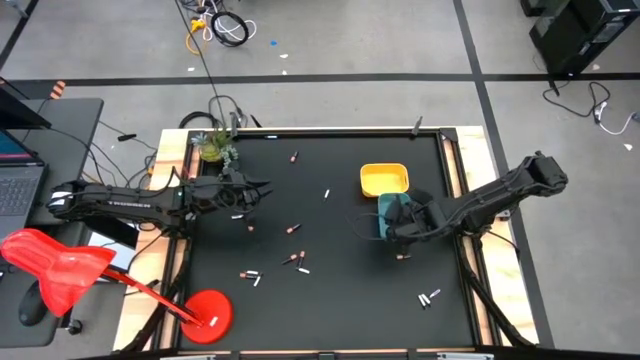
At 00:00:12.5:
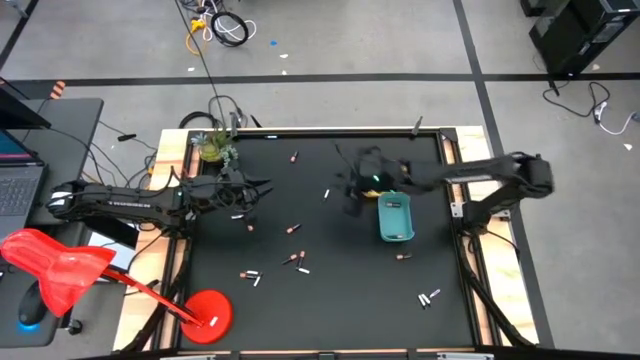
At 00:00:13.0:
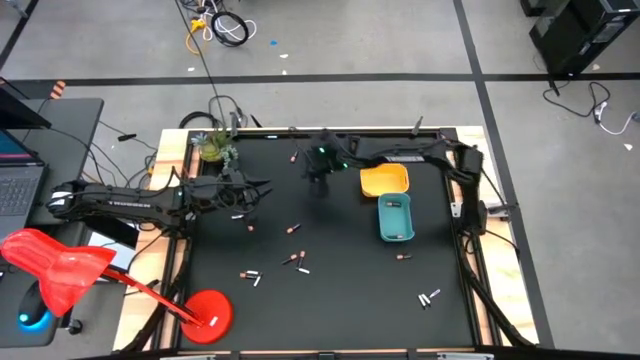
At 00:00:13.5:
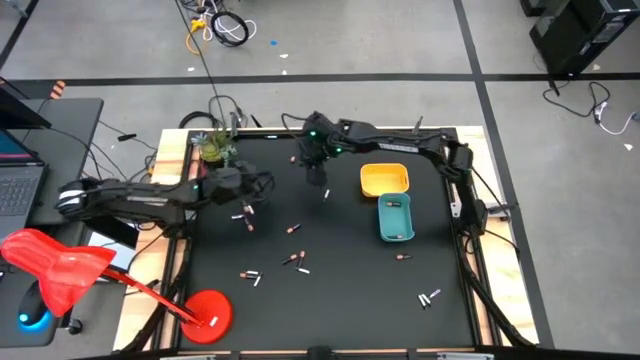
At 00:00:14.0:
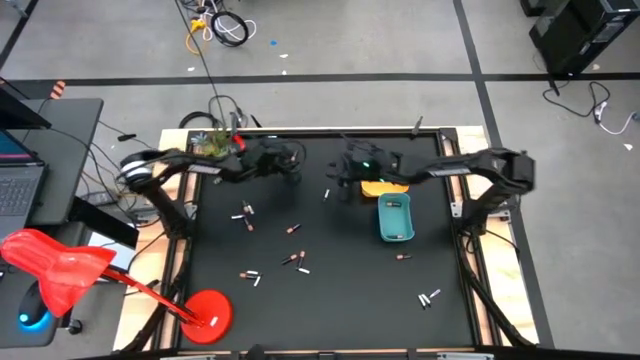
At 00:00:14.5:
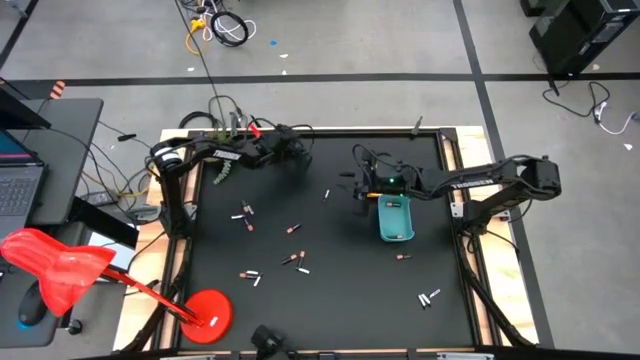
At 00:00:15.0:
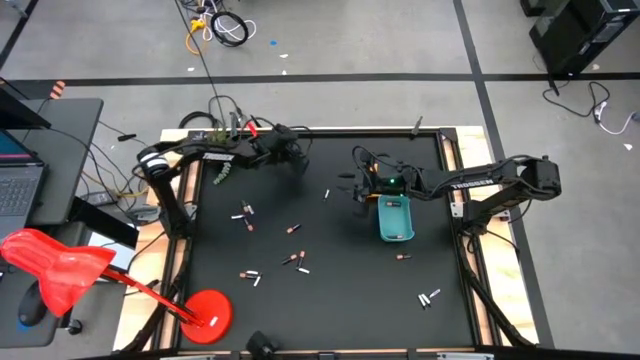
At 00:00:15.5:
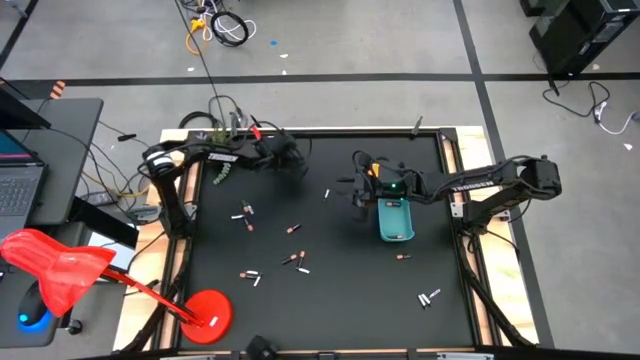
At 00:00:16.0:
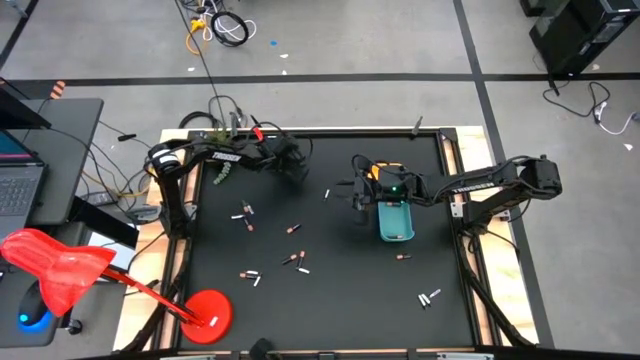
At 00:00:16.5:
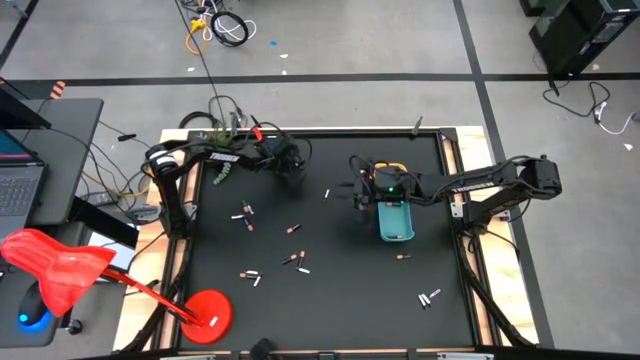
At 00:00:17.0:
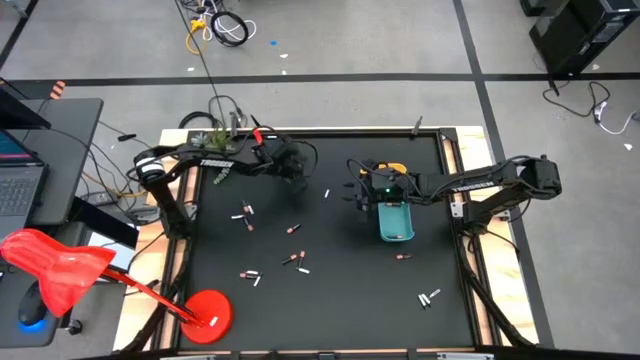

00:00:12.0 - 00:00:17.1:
Task: Sort batteries
Put the gold black battery into the blue bin

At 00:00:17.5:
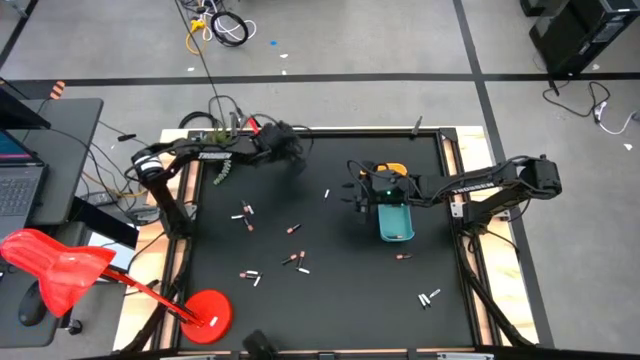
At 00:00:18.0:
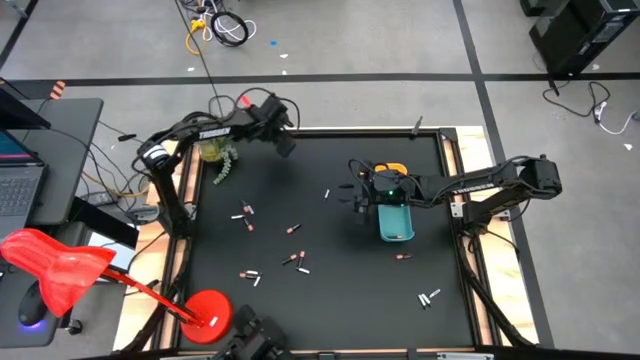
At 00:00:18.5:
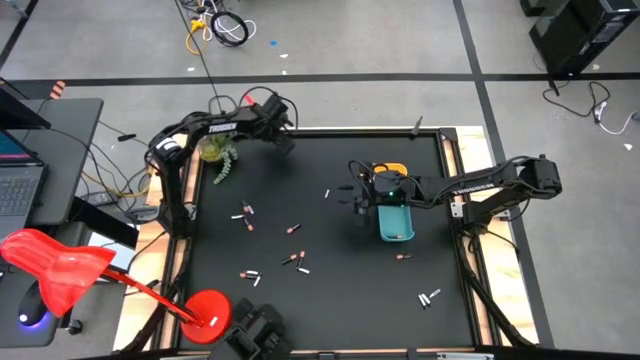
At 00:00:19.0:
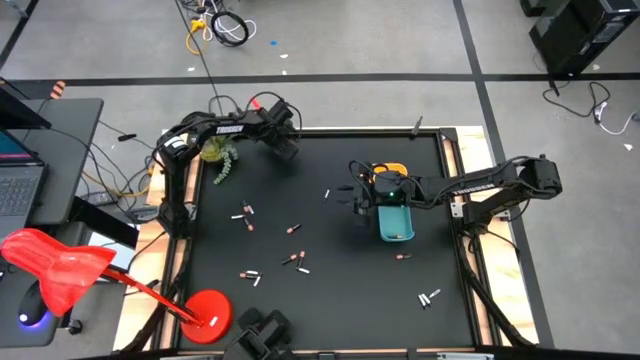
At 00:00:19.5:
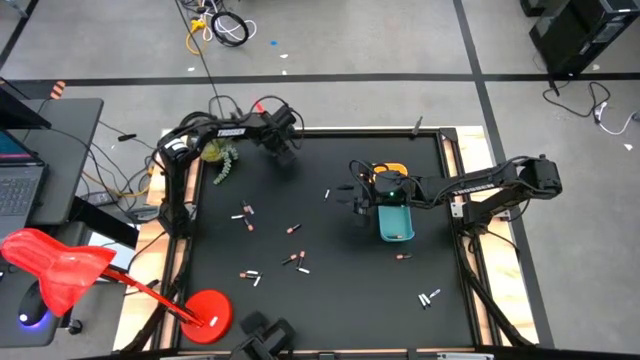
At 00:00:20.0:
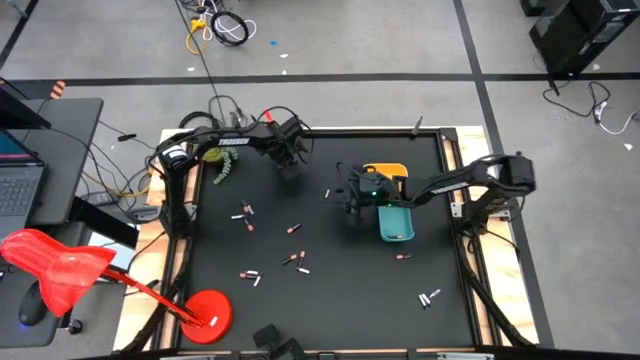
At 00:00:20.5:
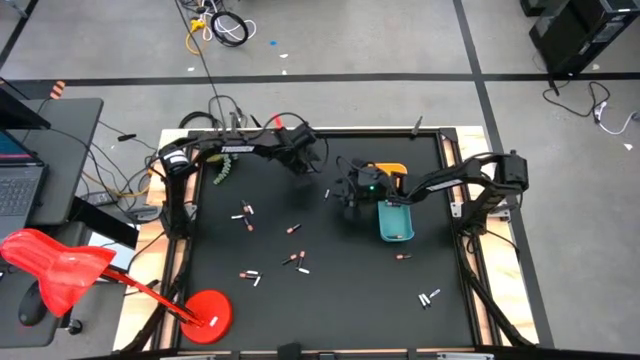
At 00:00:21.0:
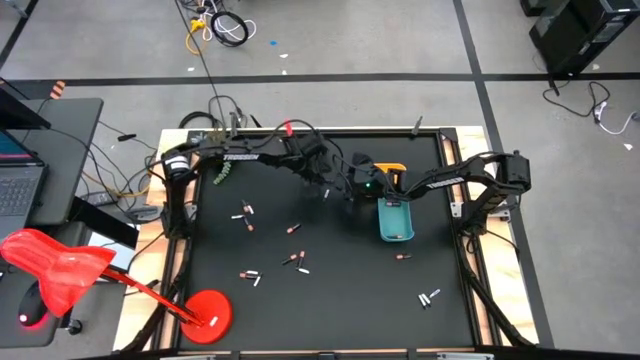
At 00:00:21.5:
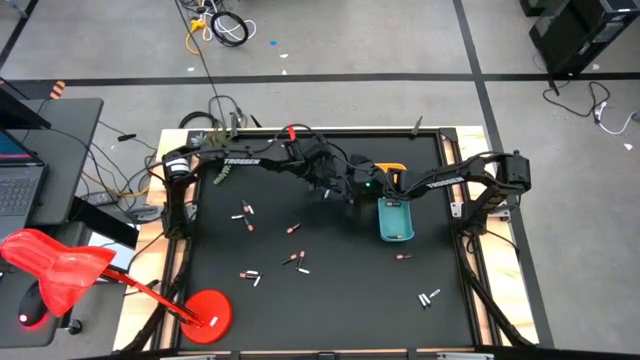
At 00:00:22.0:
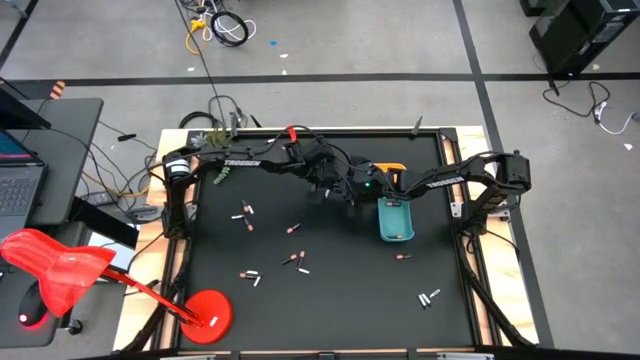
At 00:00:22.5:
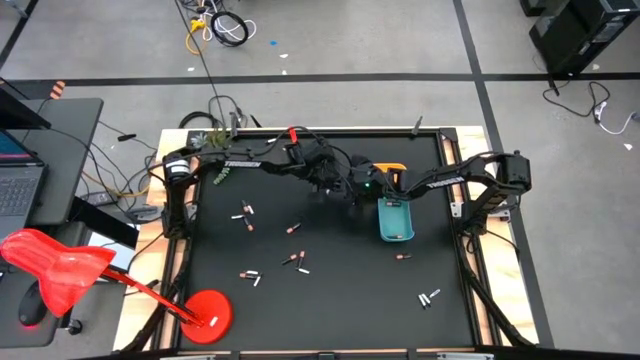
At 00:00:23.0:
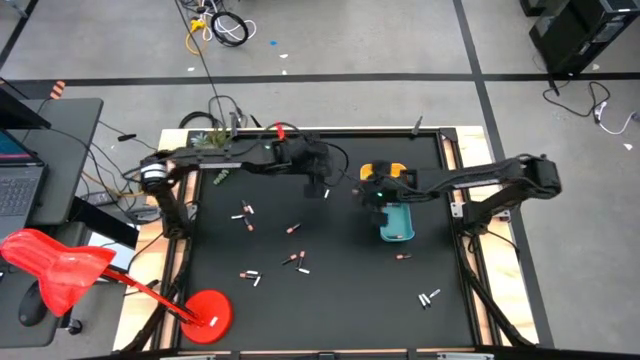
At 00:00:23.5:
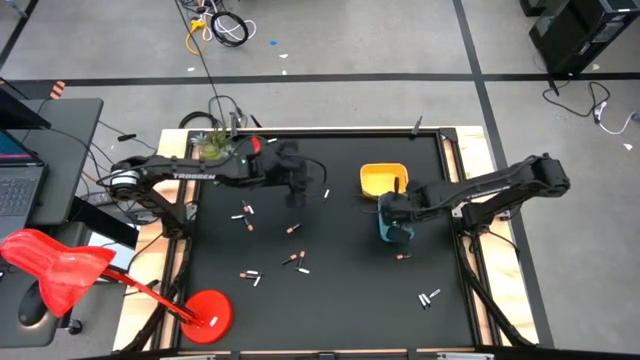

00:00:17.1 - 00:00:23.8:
Put the gold black battery into the blue bin

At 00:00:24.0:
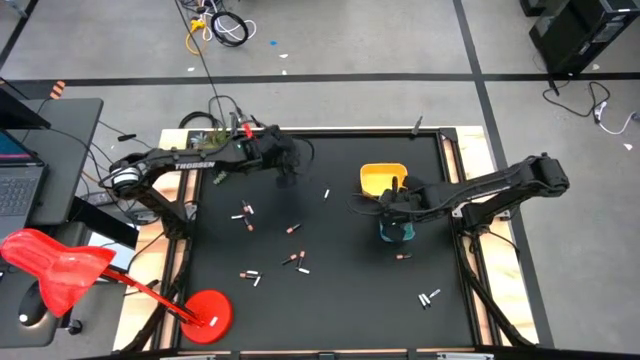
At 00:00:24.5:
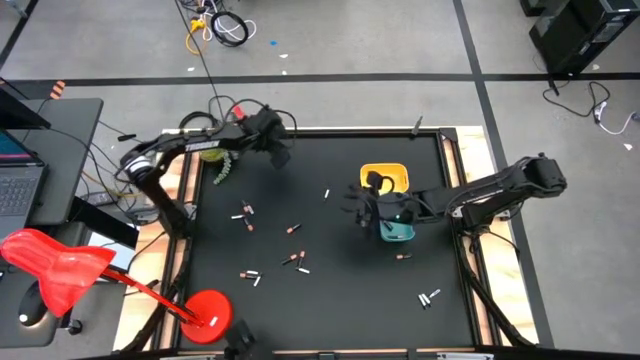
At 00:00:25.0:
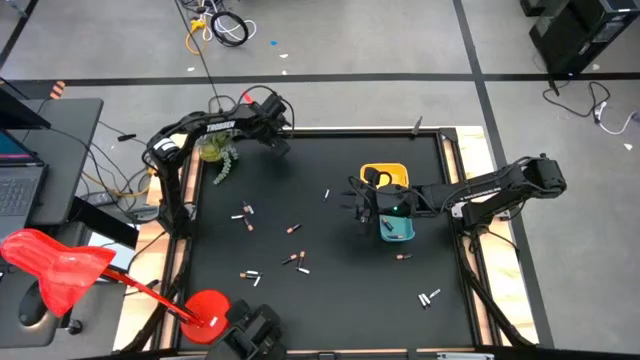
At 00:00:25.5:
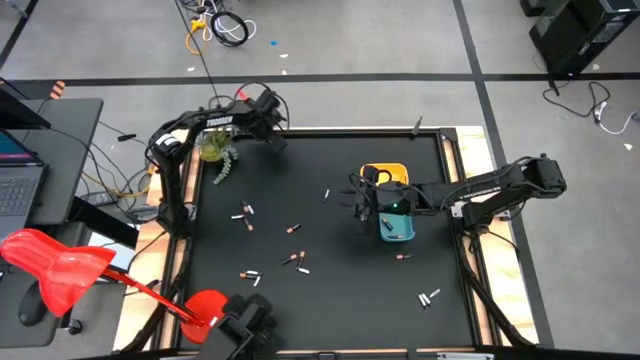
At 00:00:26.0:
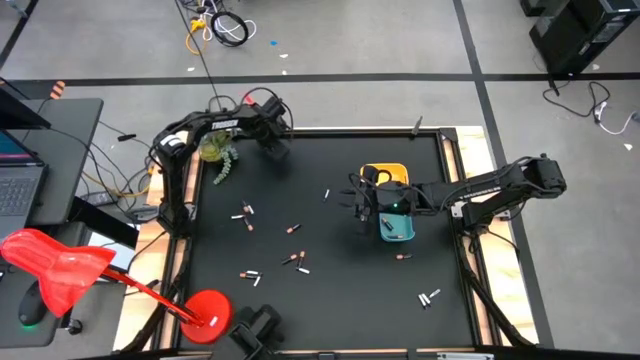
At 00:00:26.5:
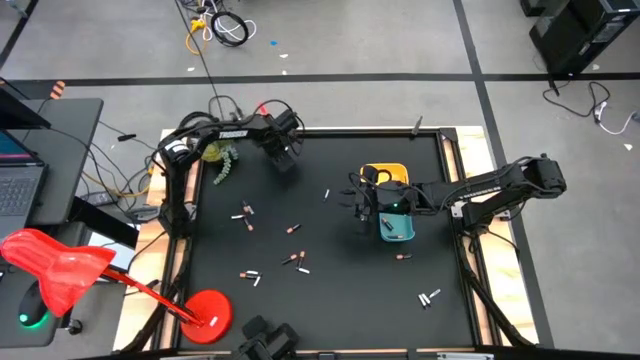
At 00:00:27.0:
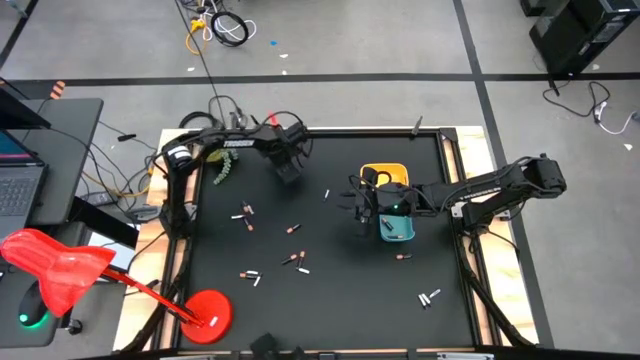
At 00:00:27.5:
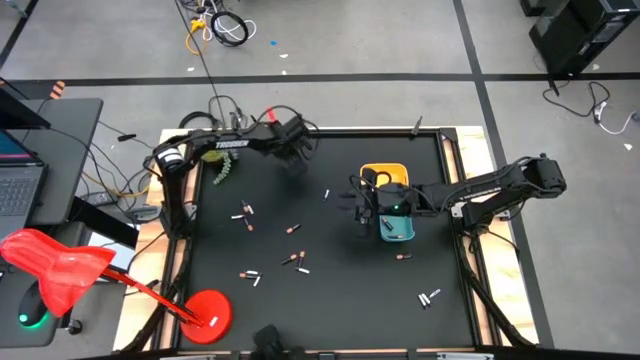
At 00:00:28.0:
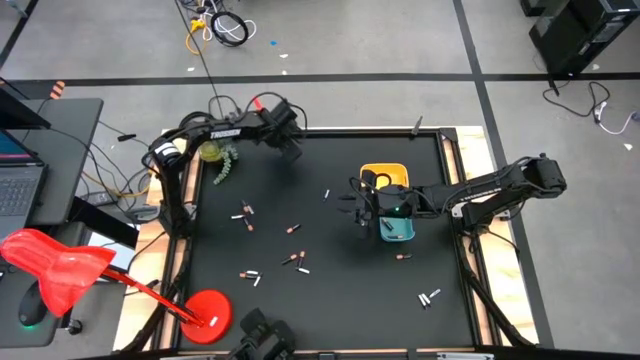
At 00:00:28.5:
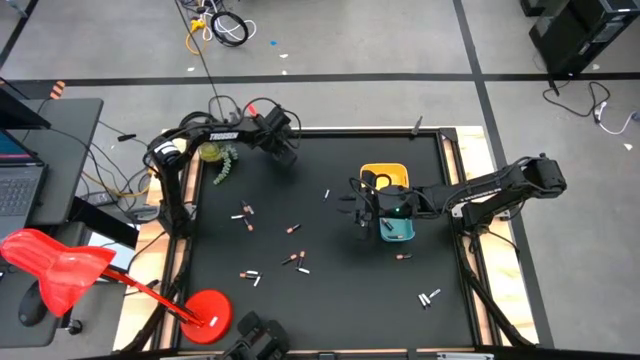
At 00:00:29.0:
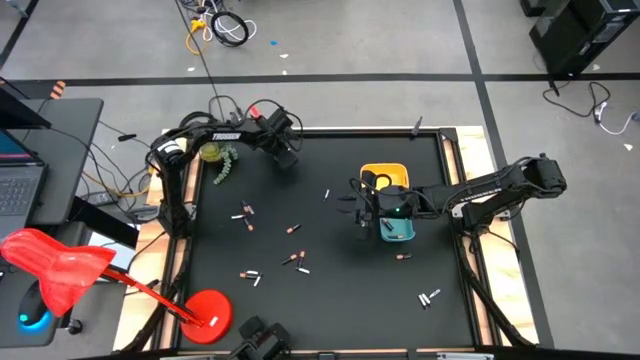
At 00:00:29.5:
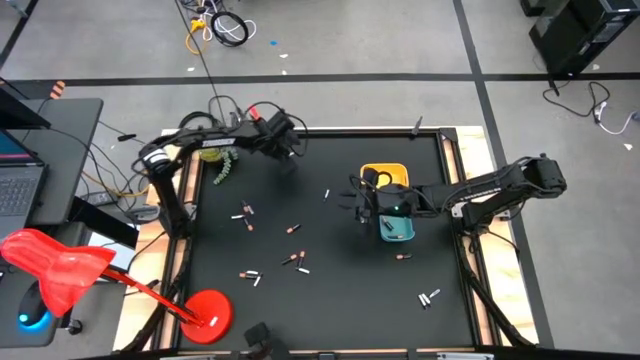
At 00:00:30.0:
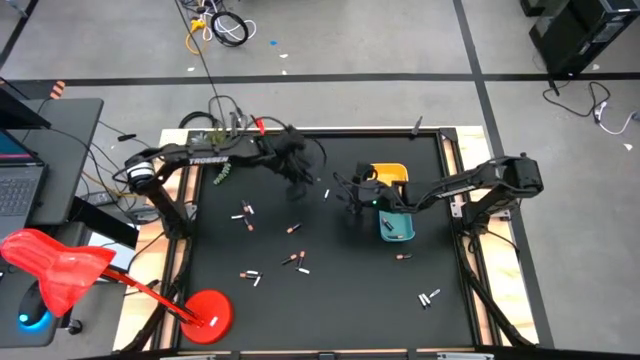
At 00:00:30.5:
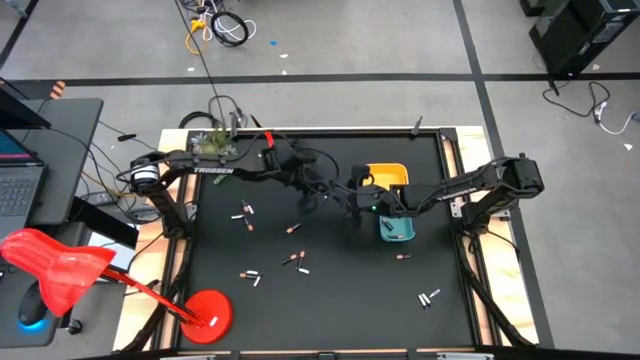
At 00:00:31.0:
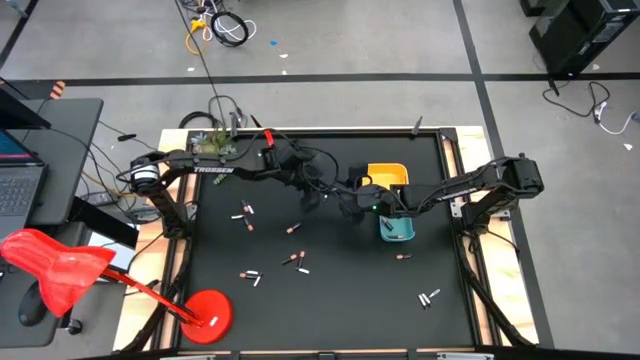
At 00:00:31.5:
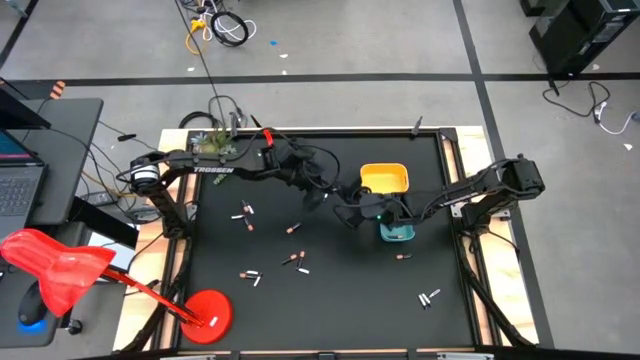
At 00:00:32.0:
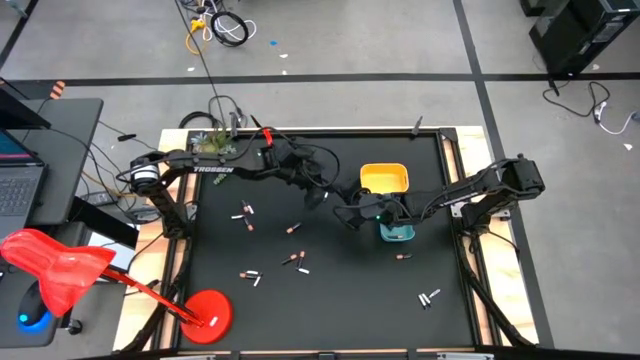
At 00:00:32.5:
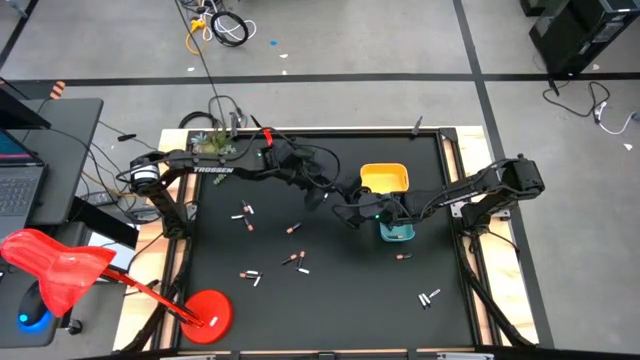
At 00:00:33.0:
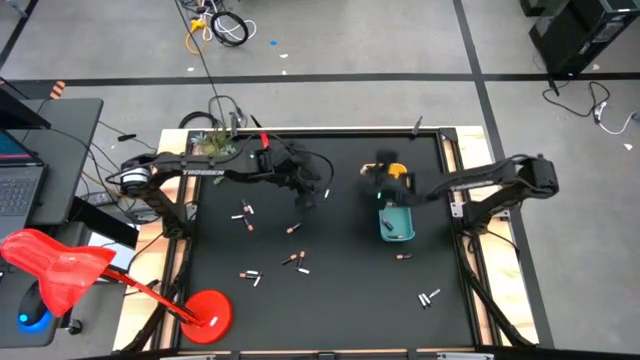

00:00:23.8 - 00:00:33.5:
Put the silver black battery into the yellow bin
